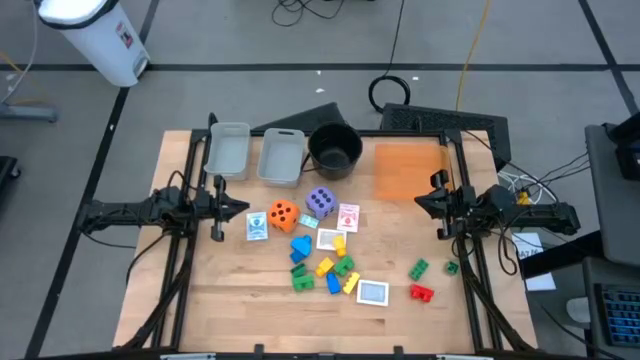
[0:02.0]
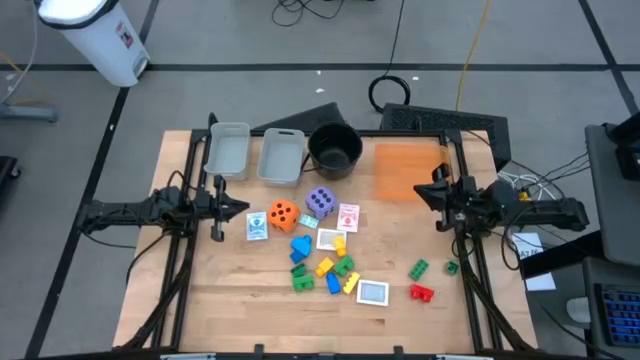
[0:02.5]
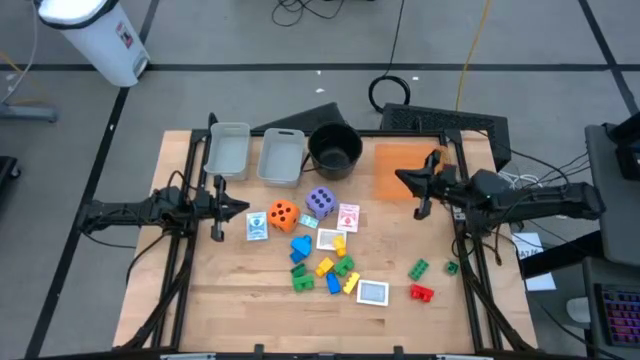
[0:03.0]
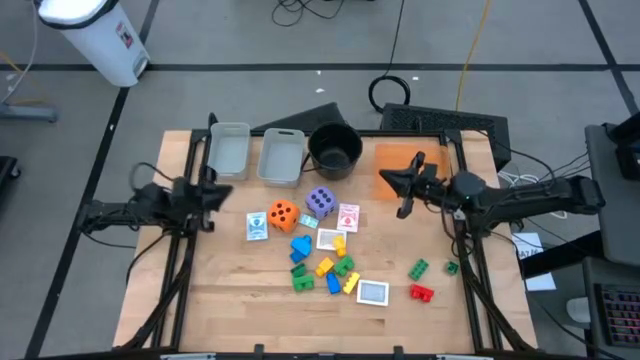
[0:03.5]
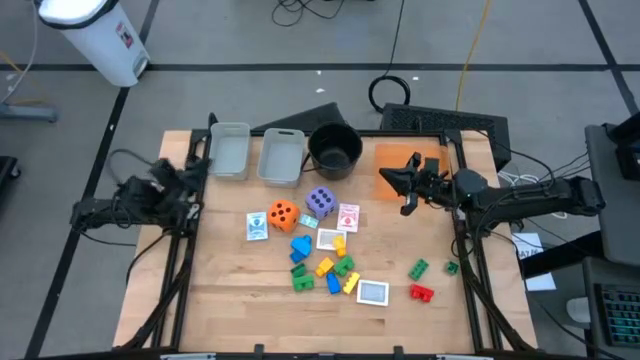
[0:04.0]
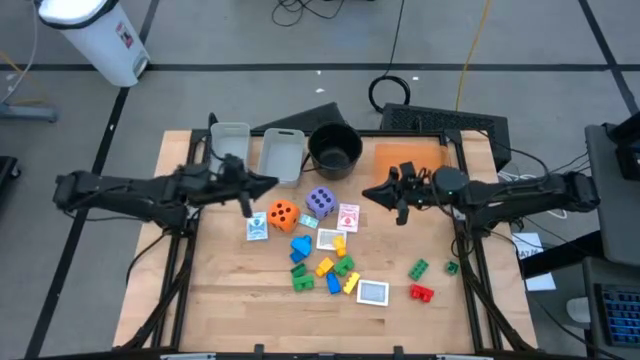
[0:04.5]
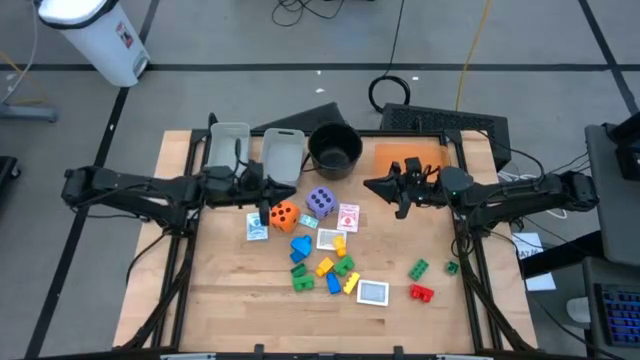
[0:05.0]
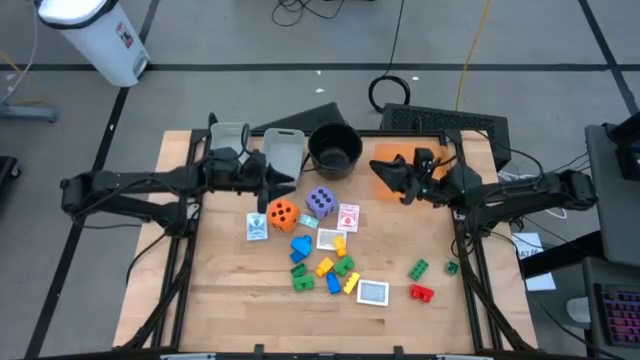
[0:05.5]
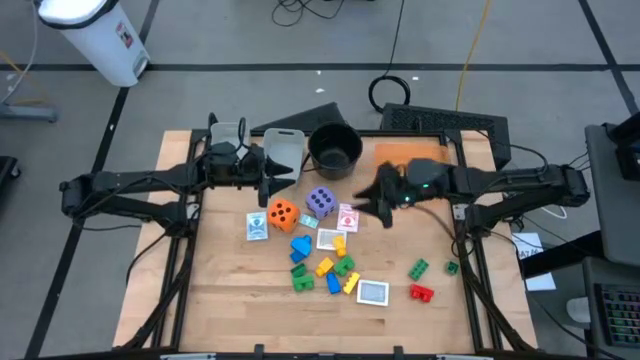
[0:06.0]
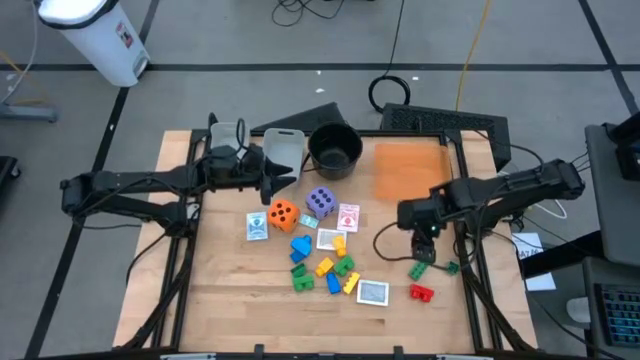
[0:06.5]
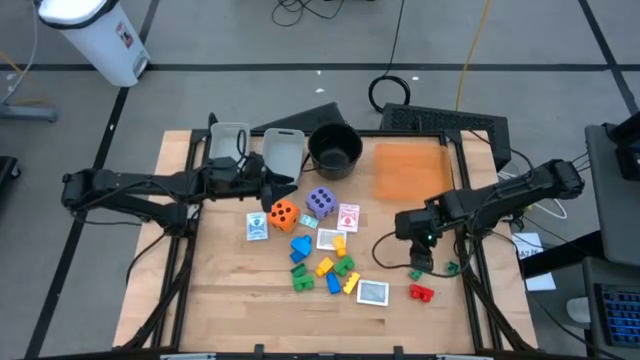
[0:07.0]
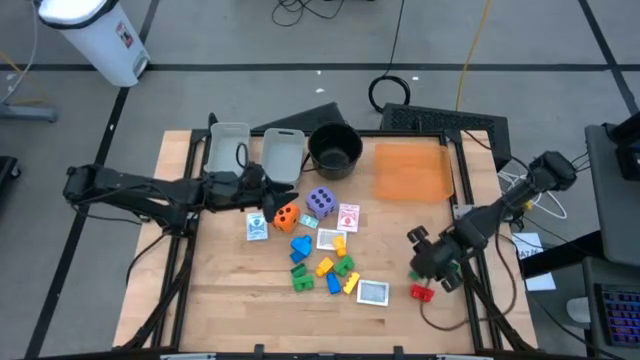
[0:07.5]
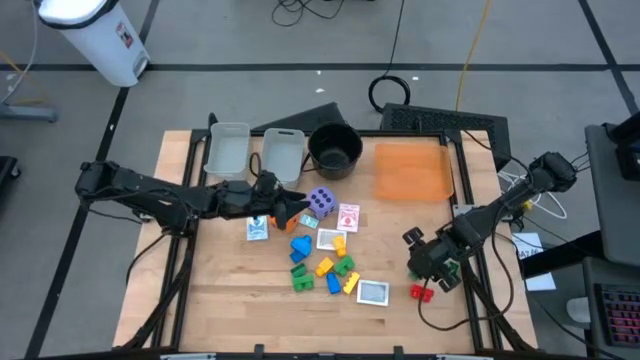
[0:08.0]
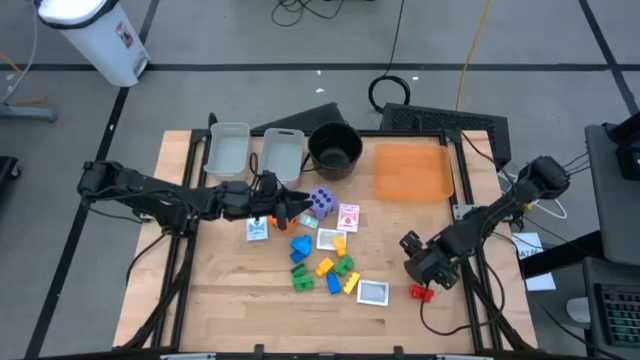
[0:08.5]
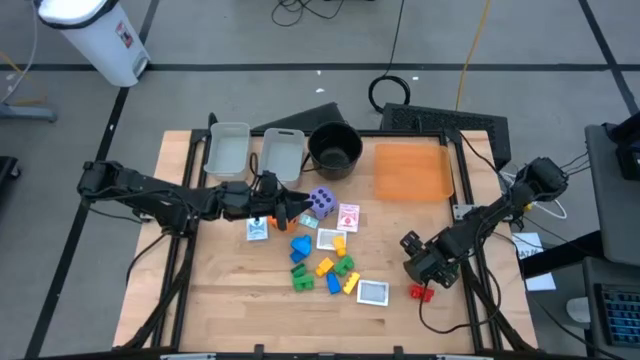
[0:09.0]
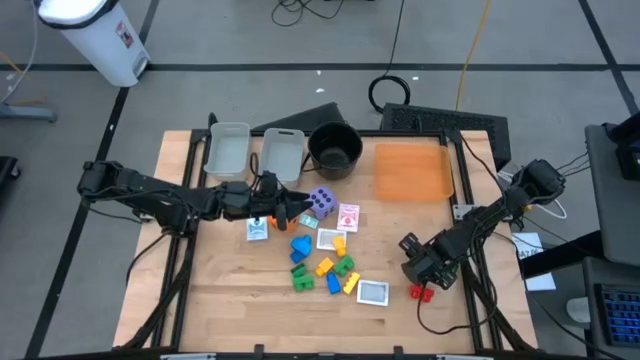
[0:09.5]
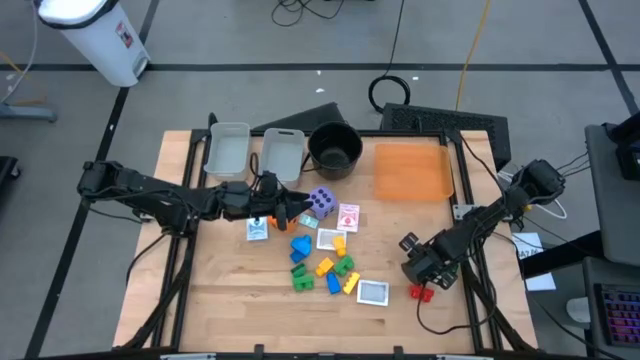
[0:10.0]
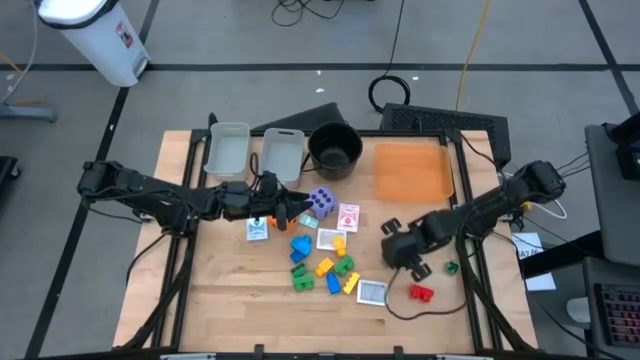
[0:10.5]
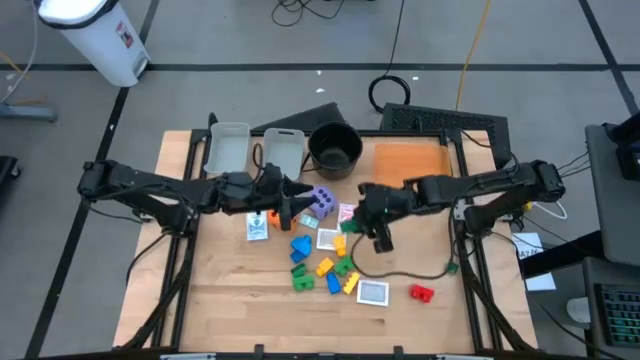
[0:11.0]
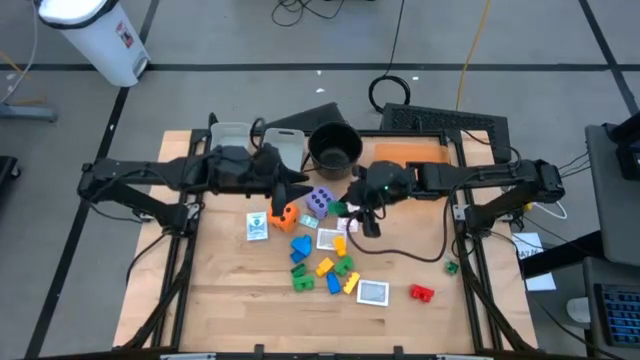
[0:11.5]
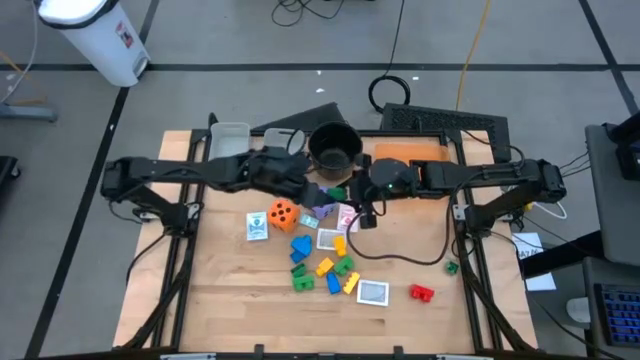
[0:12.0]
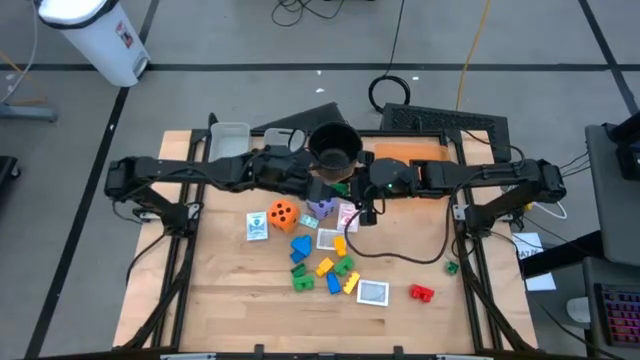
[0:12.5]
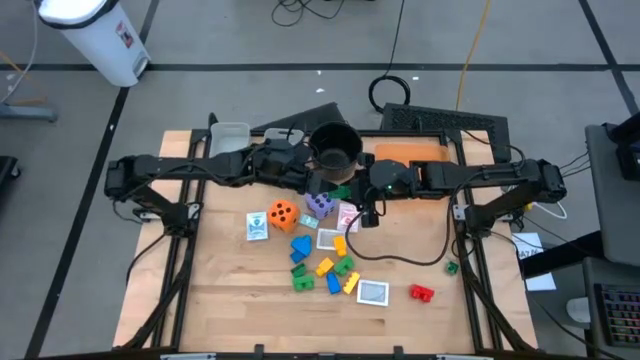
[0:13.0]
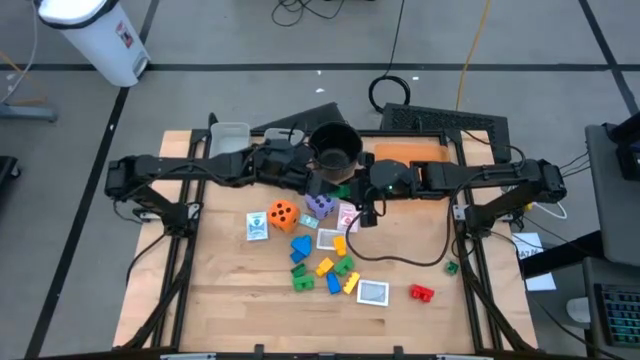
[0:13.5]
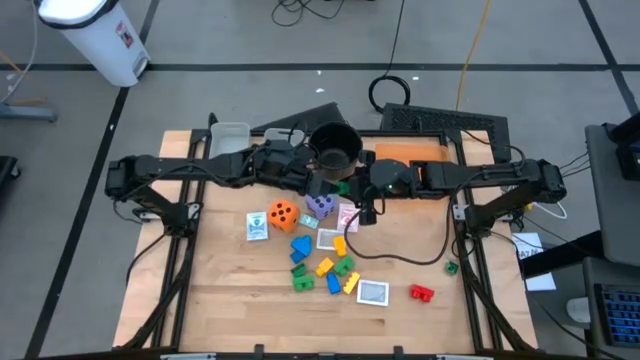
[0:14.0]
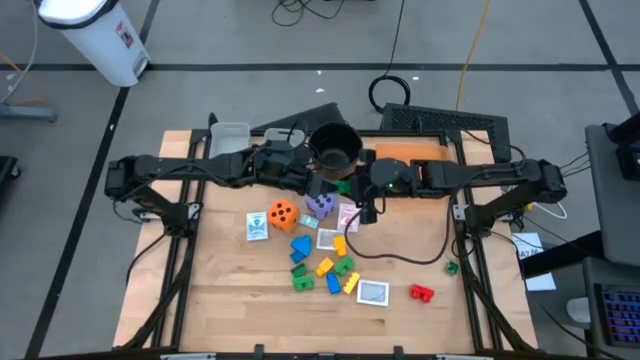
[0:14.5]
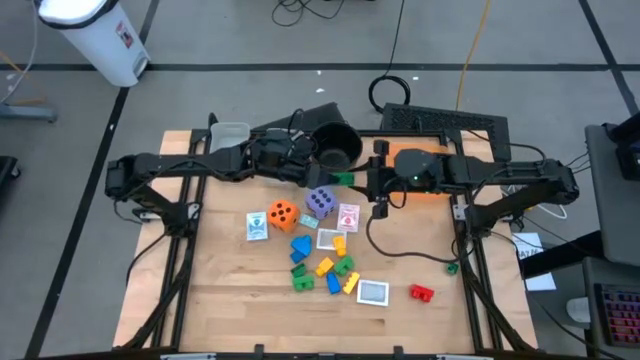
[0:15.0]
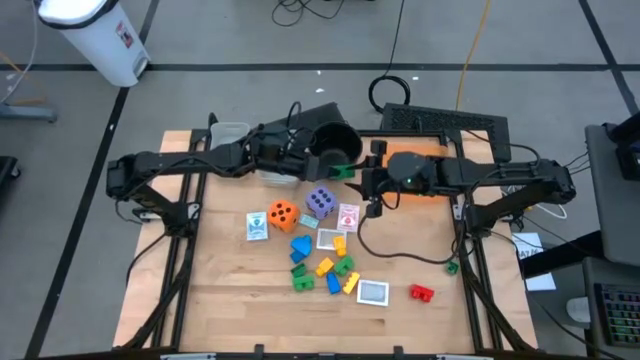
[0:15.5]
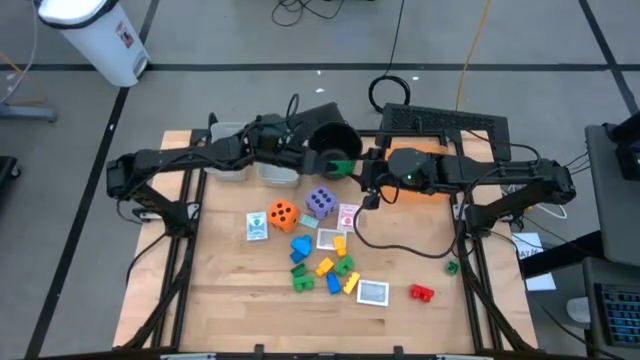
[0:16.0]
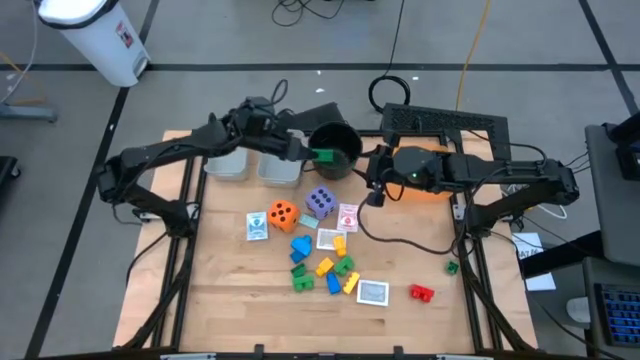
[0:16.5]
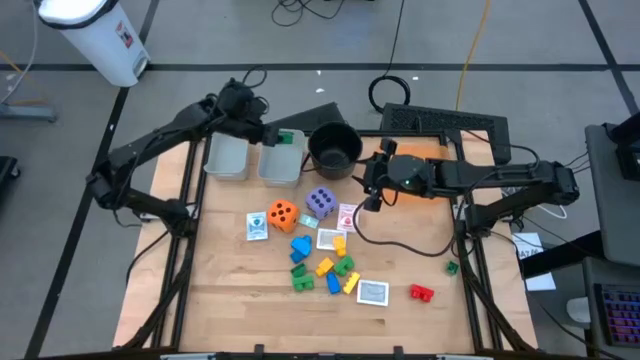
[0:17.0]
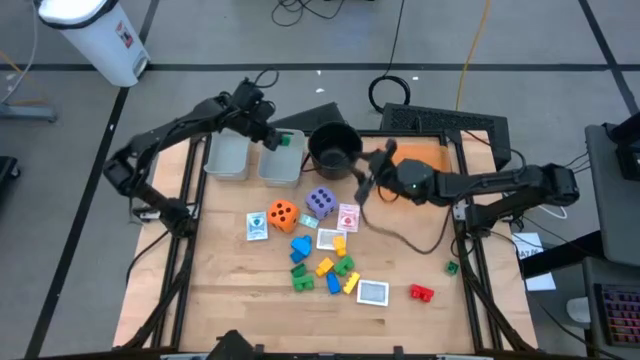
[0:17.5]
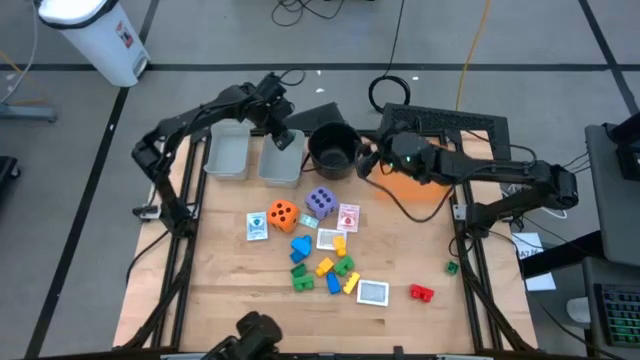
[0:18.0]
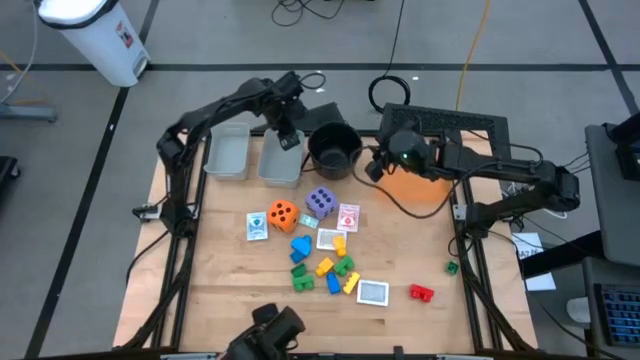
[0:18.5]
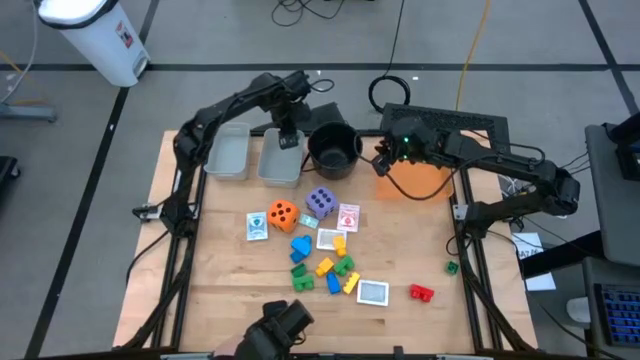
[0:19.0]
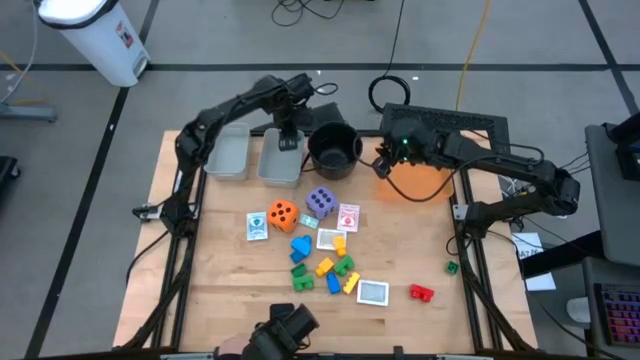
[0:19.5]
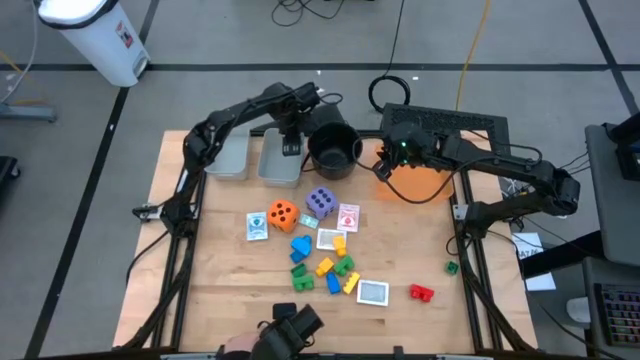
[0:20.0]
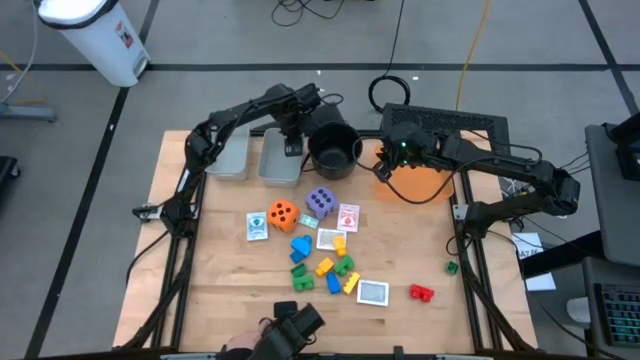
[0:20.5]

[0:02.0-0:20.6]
Task: Pick & Place Toys
Put the green game piece into the right gray bin

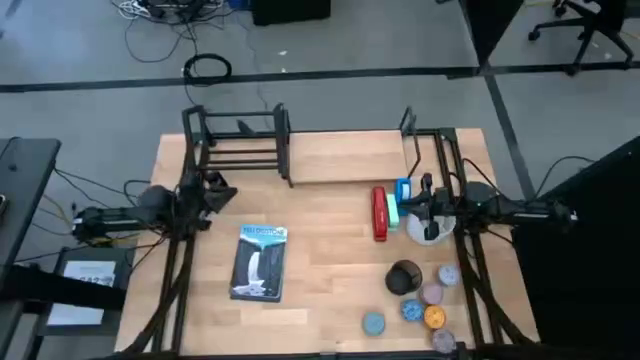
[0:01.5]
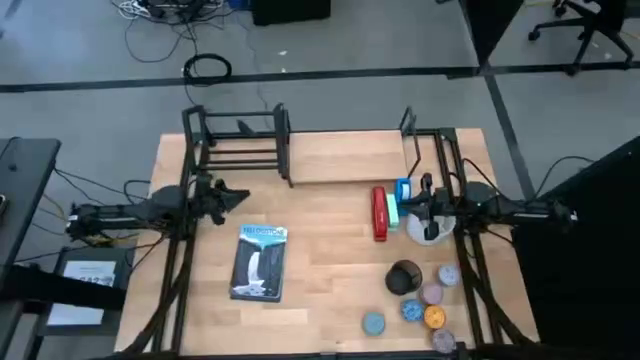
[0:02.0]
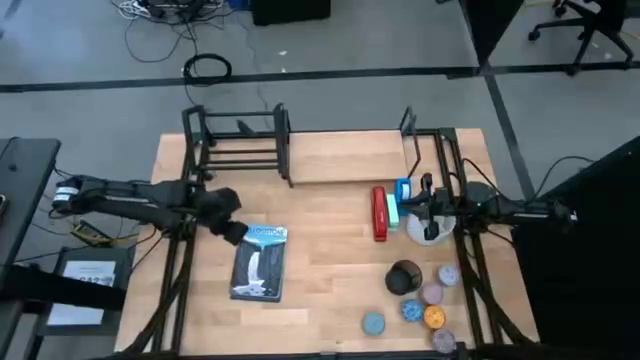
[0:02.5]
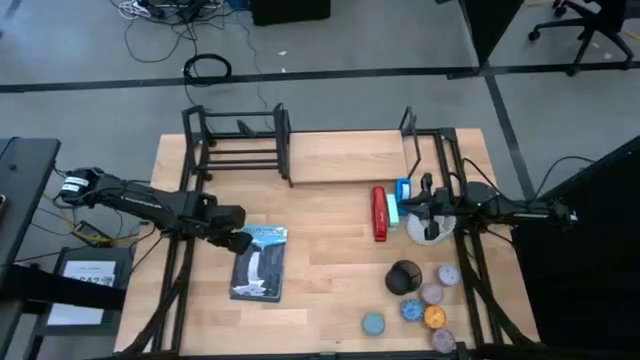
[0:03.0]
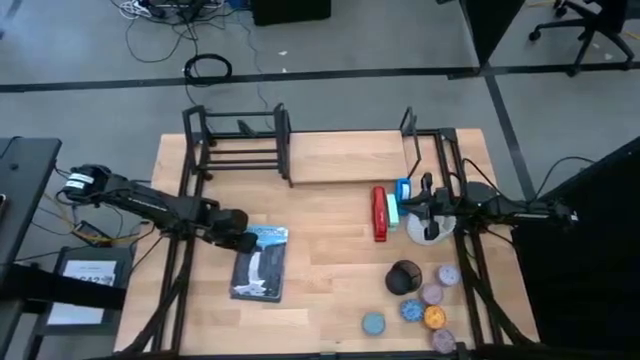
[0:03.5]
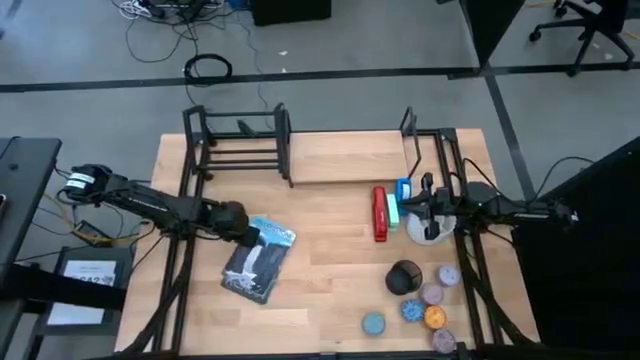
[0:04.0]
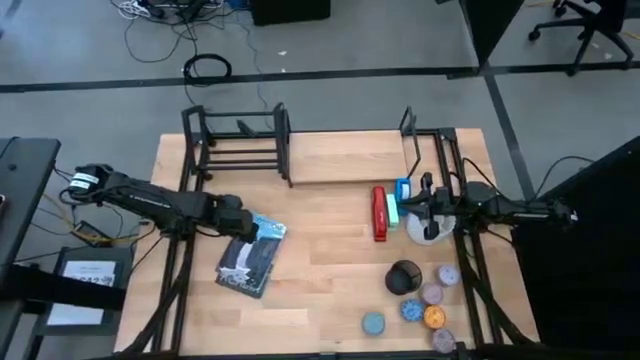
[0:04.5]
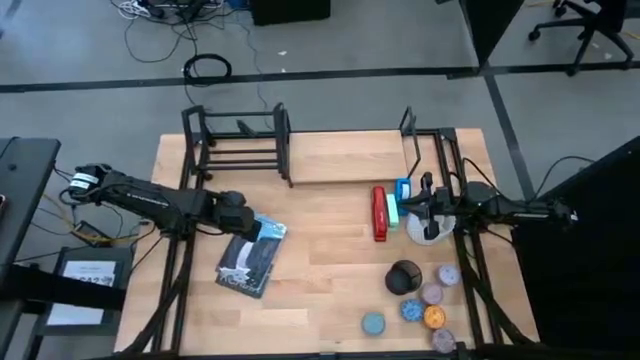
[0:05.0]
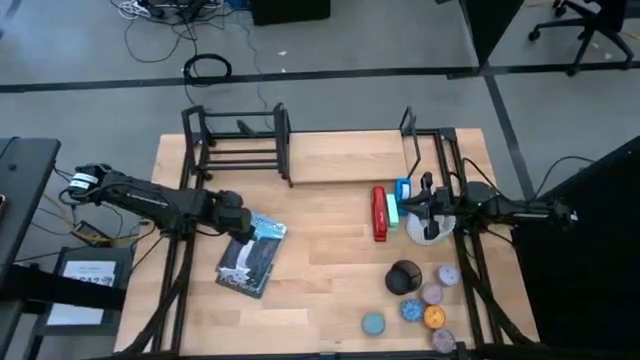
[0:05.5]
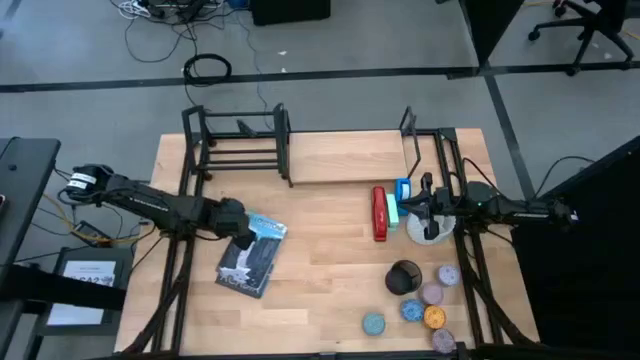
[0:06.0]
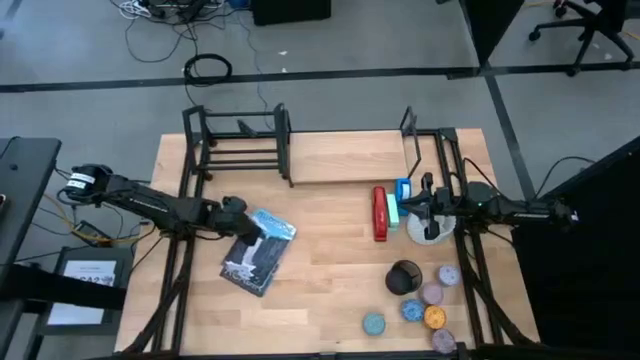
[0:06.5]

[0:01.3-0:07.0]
Task: Stock shelves
Put the blue book on the book shelf
